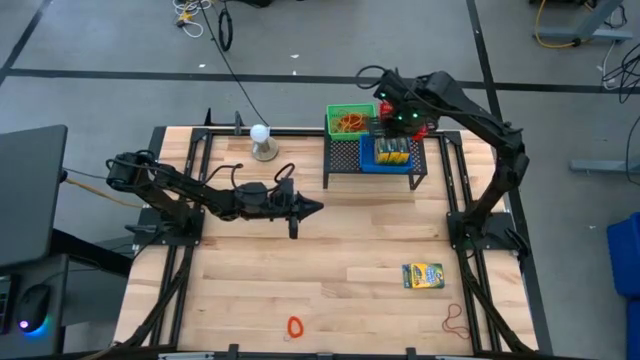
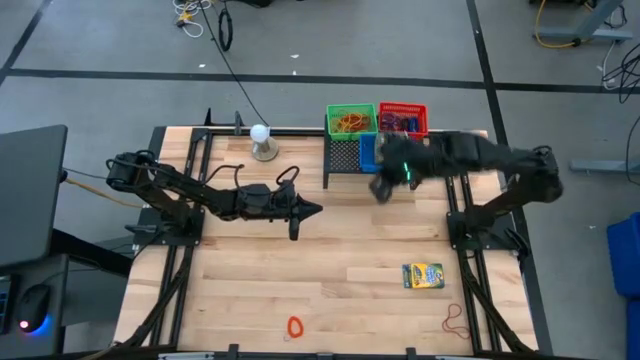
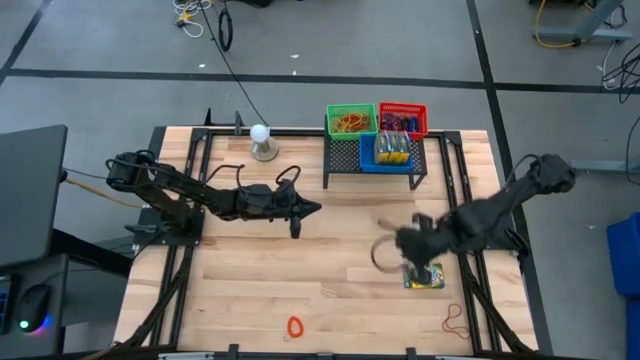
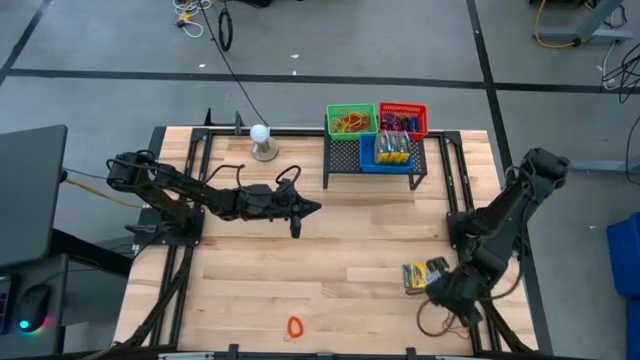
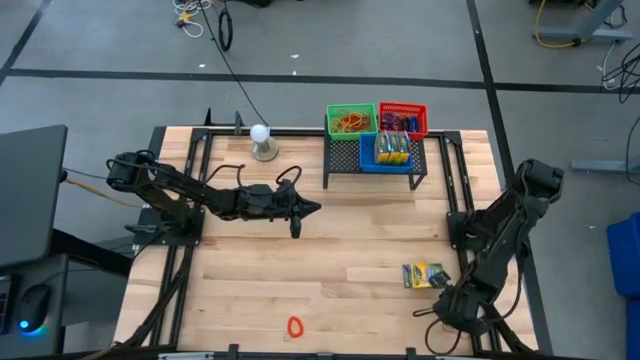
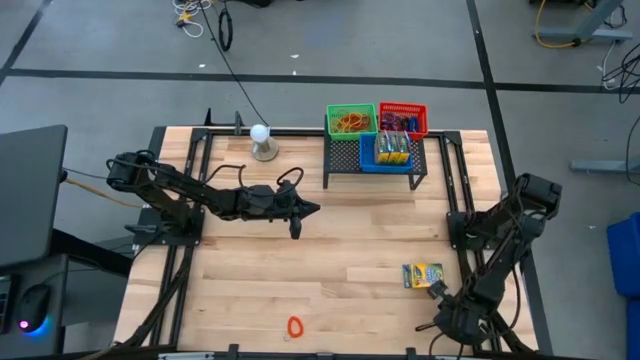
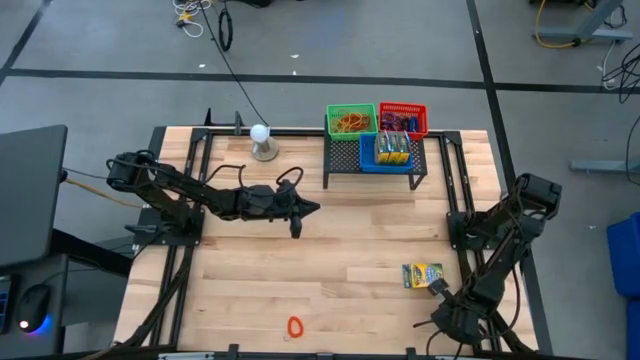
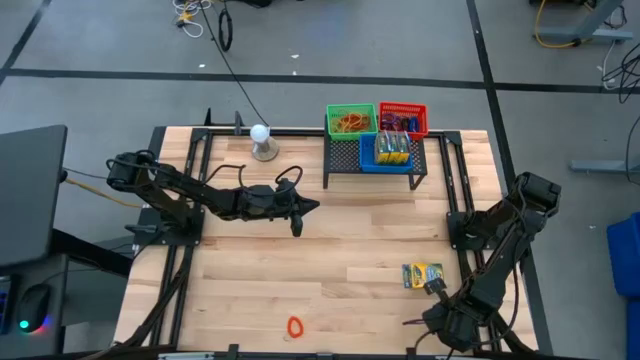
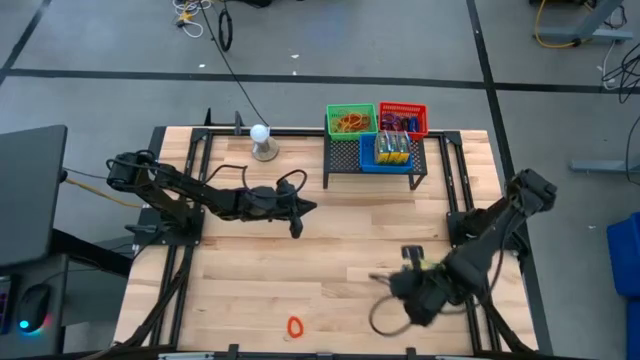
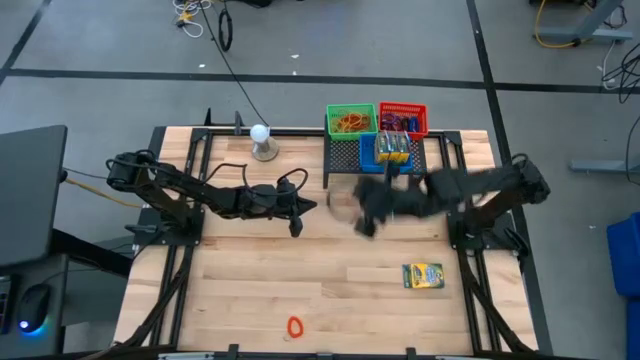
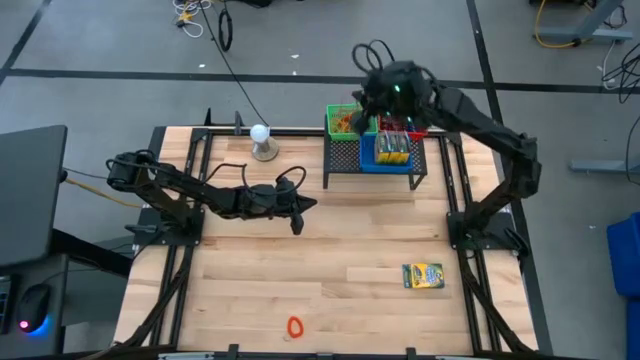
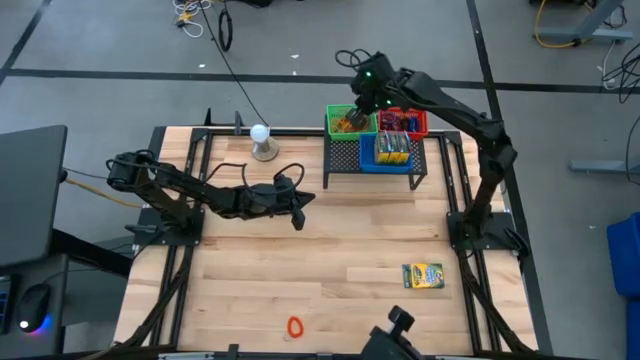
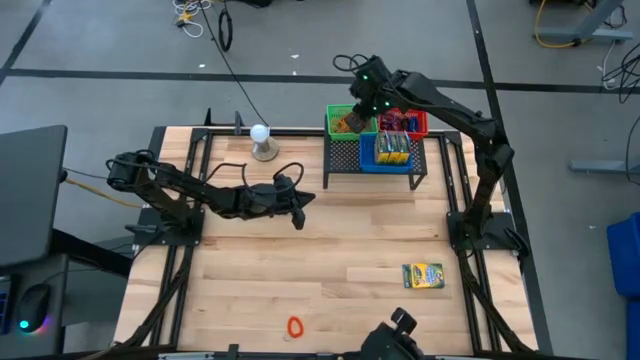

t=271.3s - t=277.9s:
Task: Pick & Place Office Desk Supplies
Put the red rubber band into the green bin

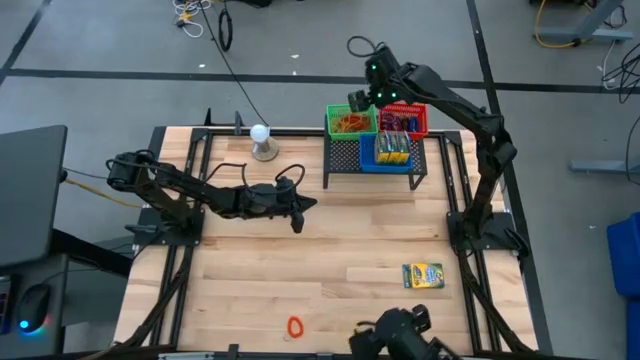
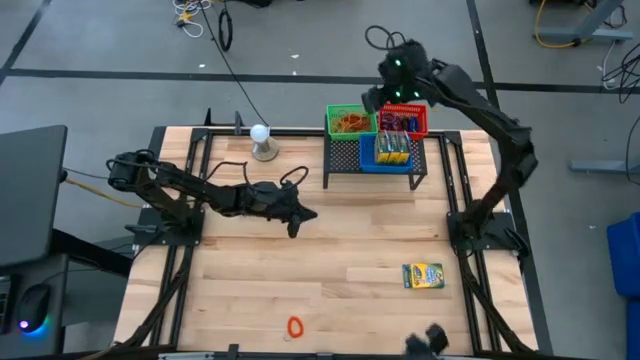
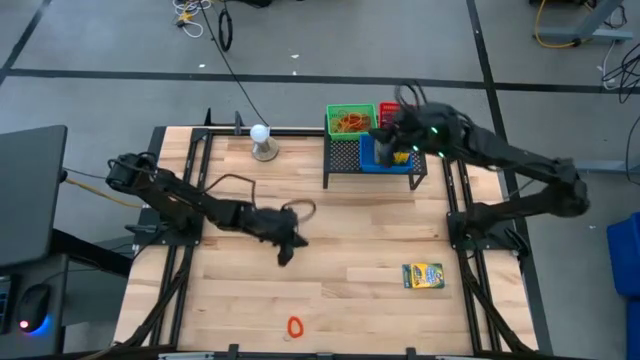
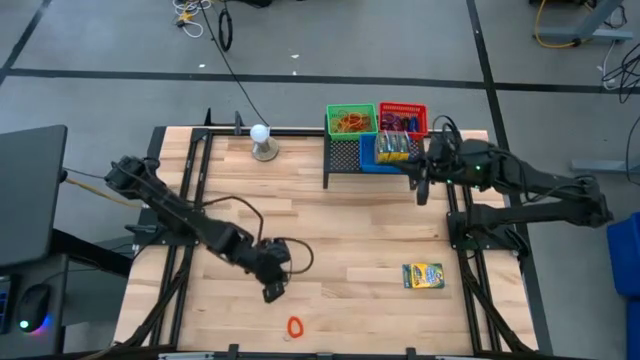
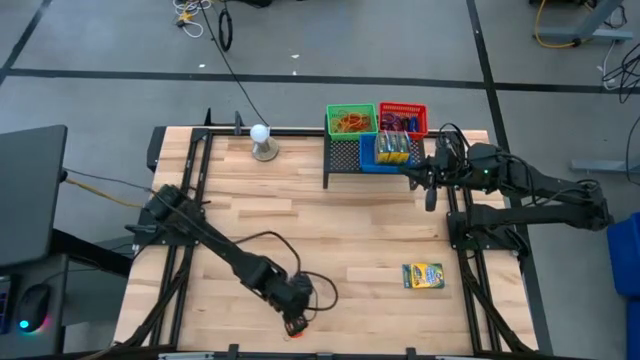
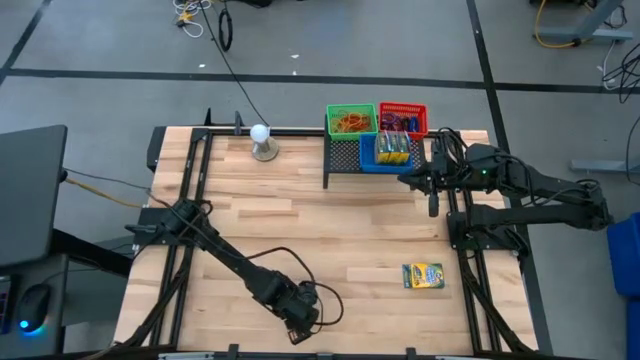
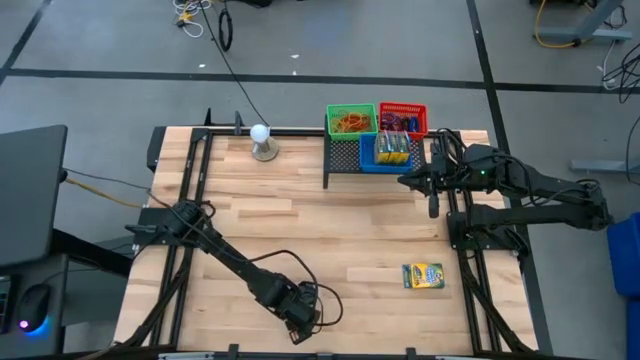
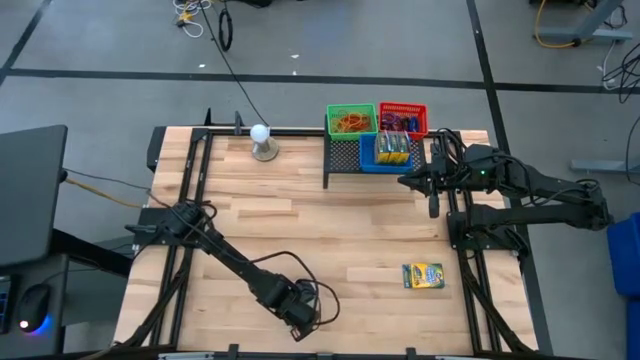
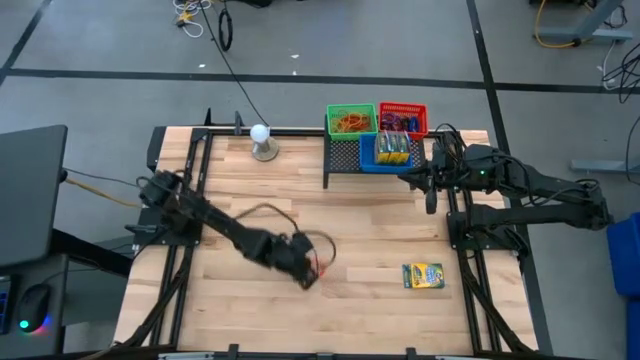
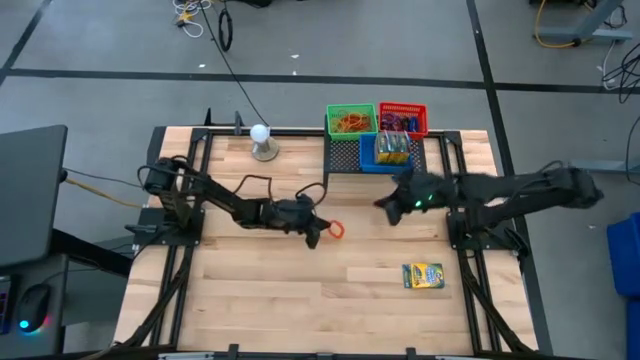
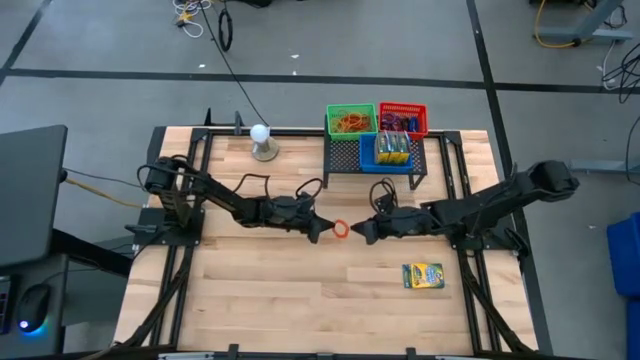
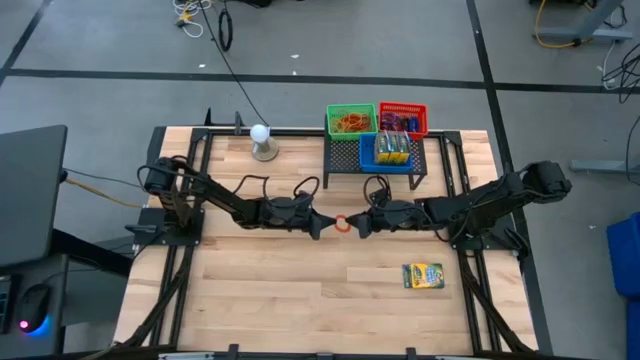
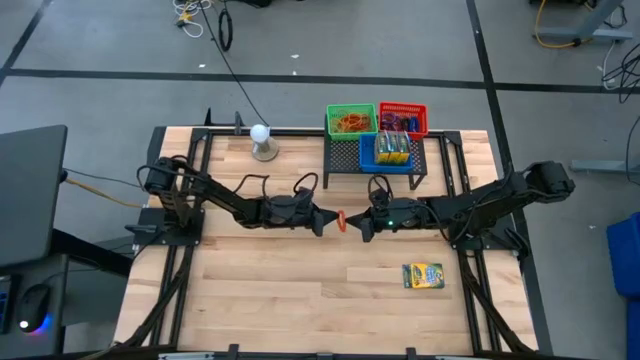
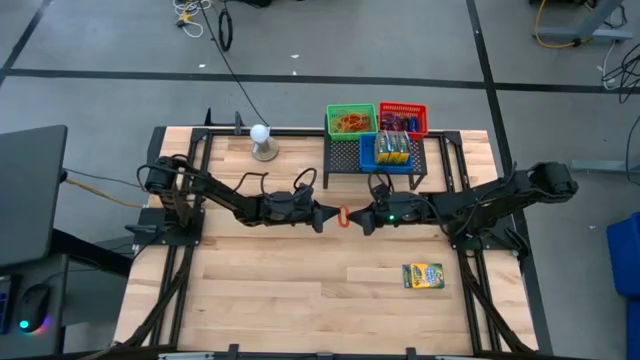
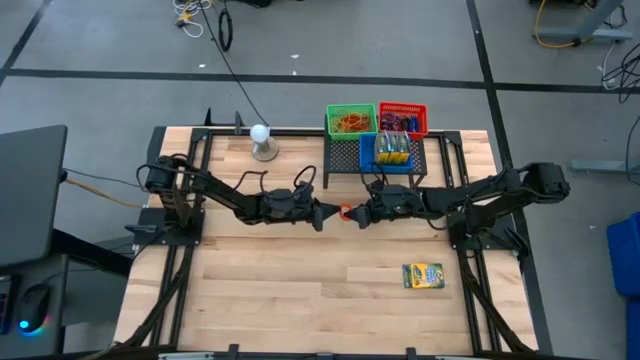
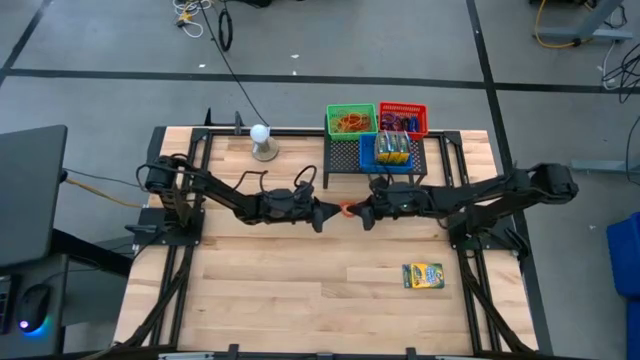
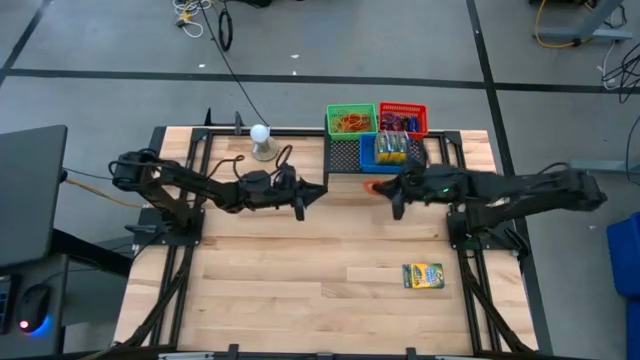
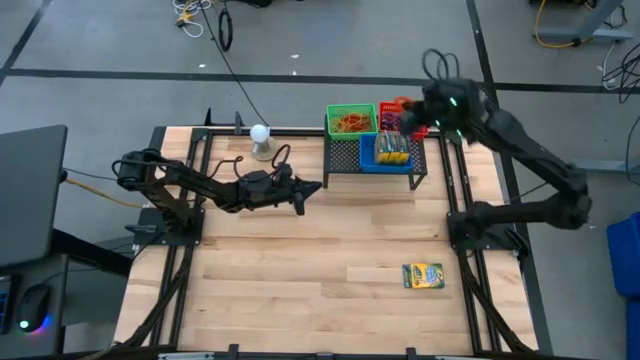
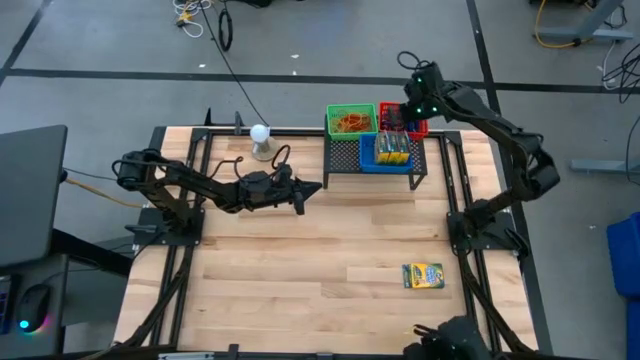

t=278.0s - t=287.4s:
Put the orange spiral keychain into the red bin

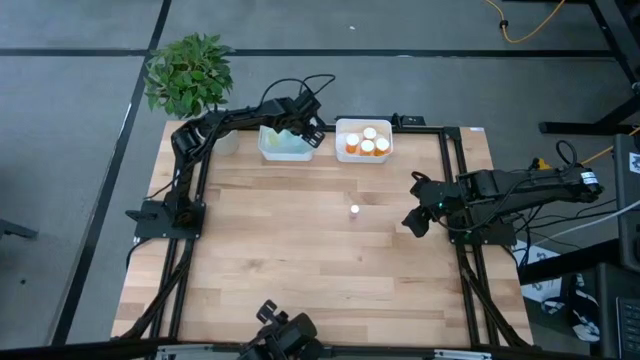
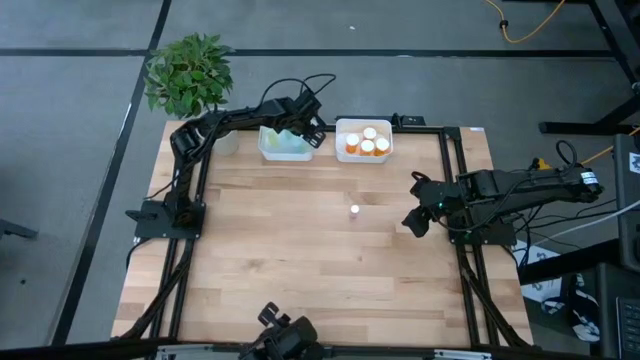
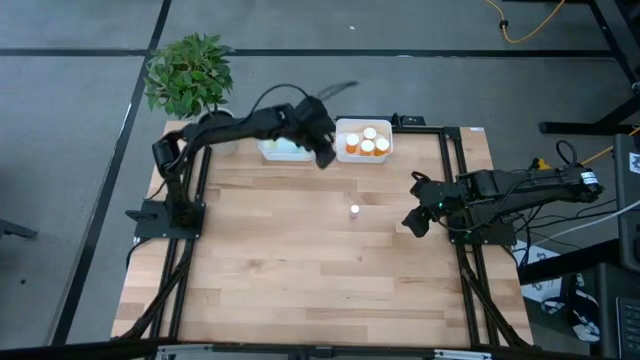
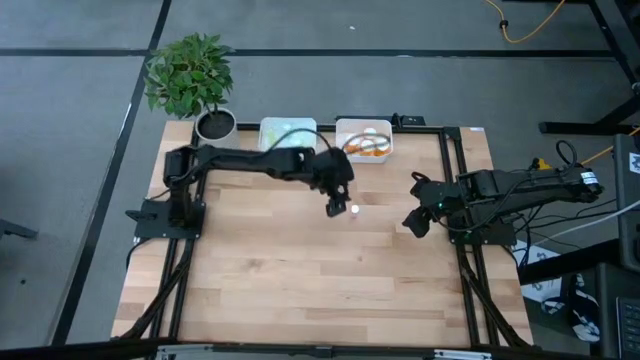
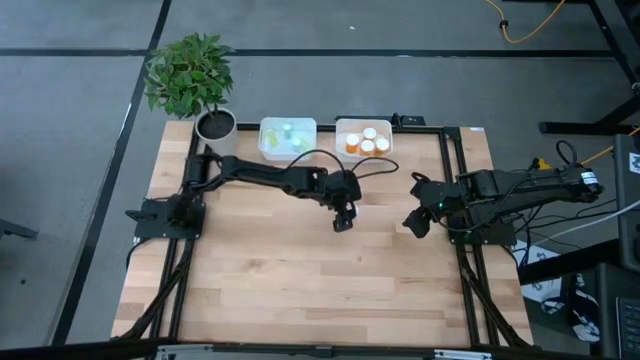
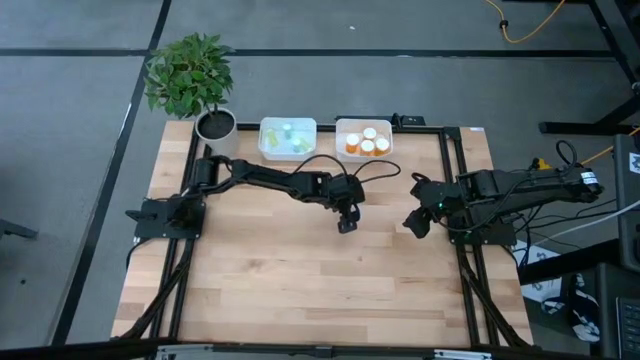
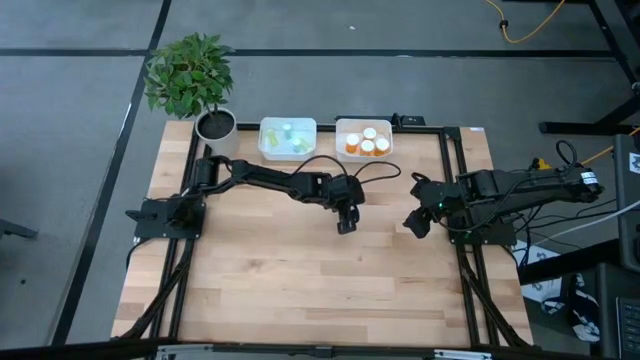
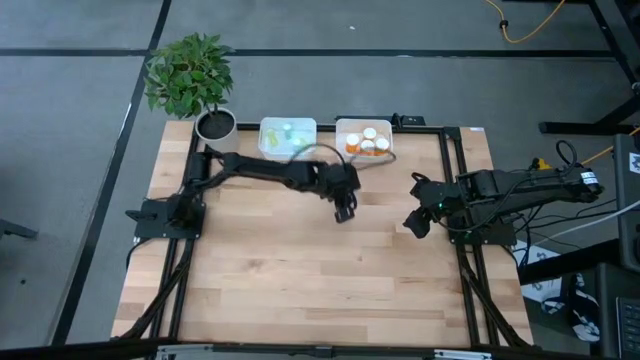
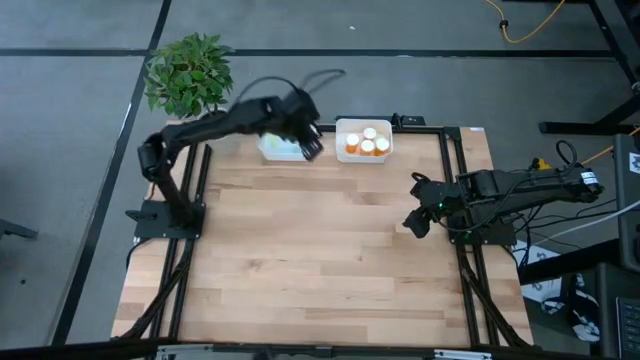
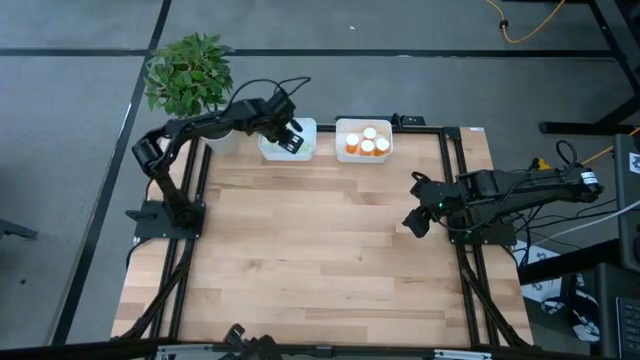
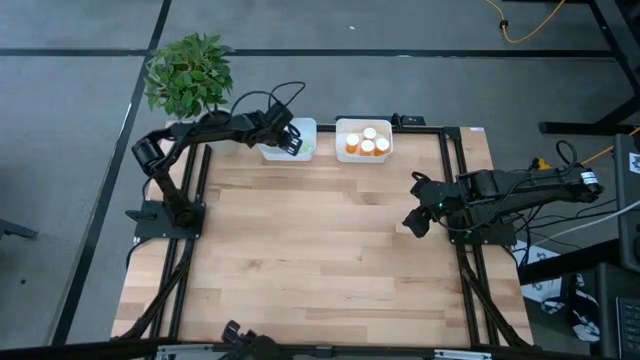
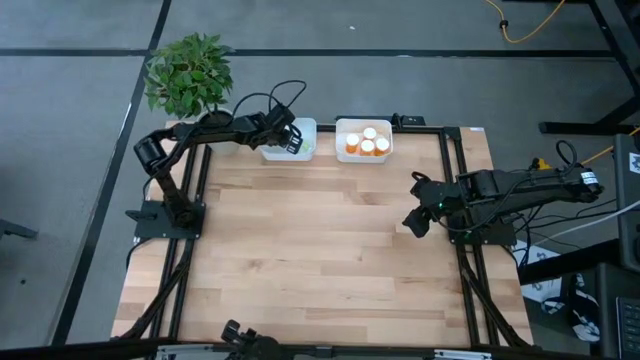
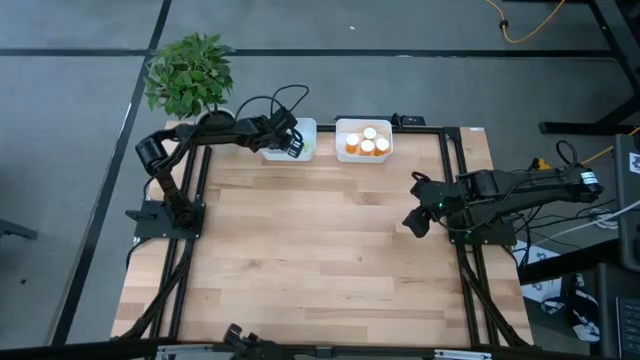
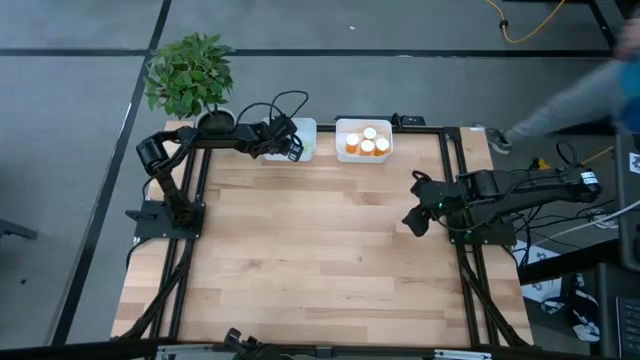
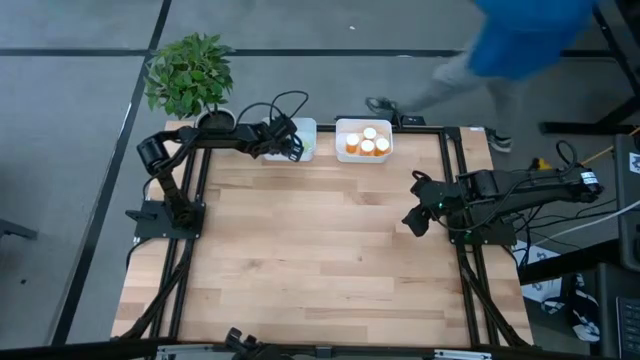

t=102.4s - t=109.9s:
Task: Pick and place medicine bottles into bin by pill shape (circle, oval)
Put the pink tablet bottle into the left white bin
